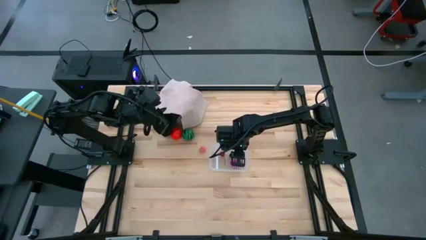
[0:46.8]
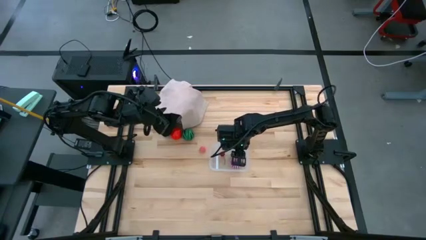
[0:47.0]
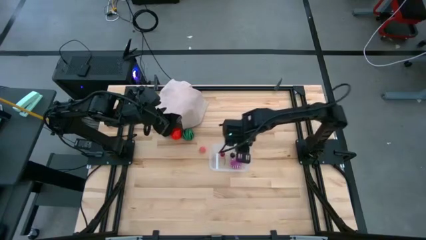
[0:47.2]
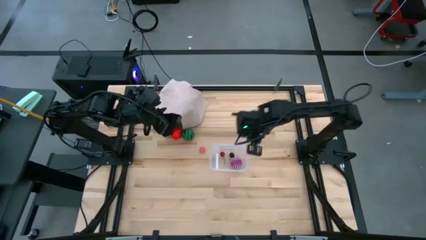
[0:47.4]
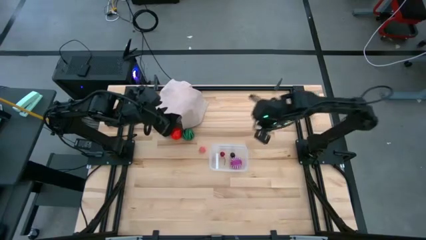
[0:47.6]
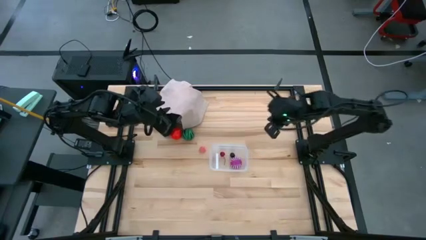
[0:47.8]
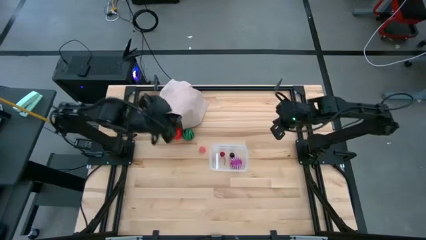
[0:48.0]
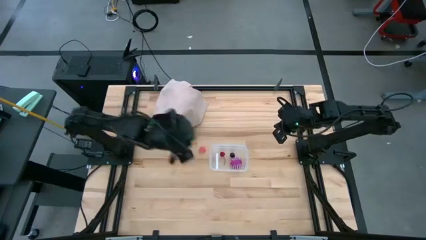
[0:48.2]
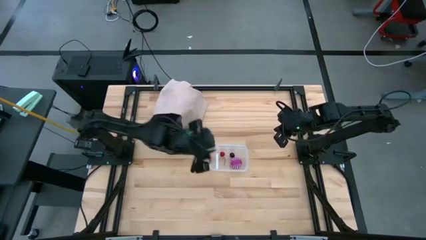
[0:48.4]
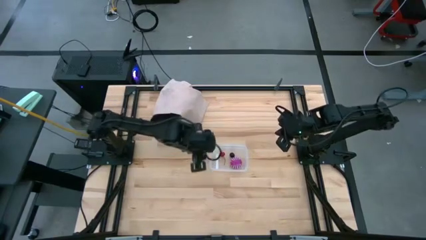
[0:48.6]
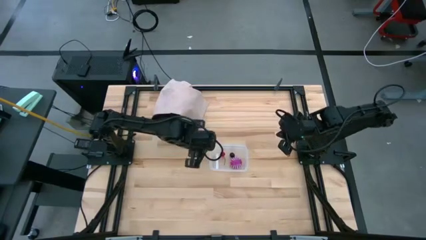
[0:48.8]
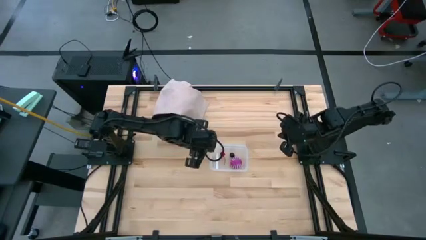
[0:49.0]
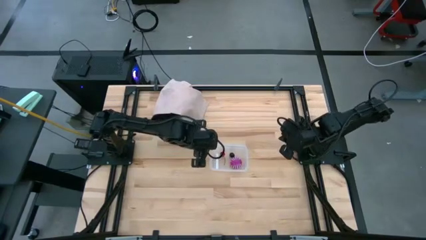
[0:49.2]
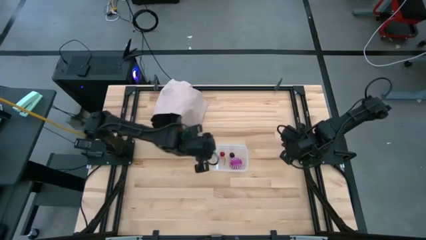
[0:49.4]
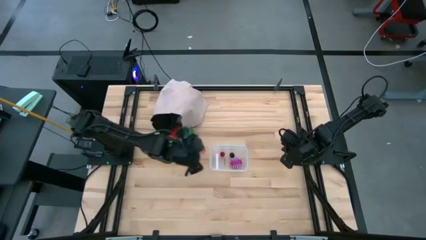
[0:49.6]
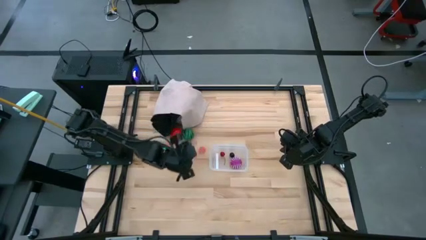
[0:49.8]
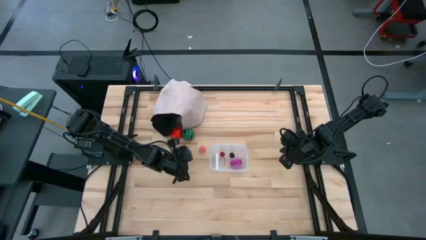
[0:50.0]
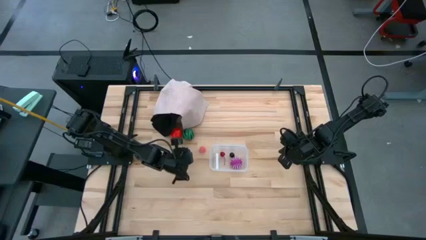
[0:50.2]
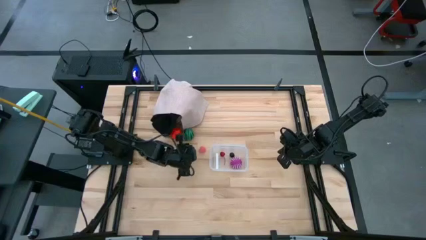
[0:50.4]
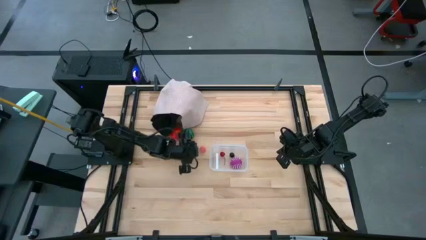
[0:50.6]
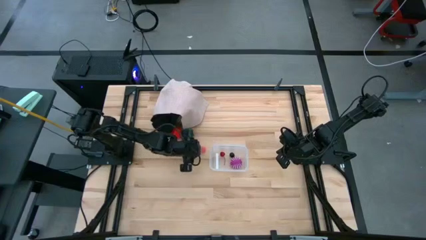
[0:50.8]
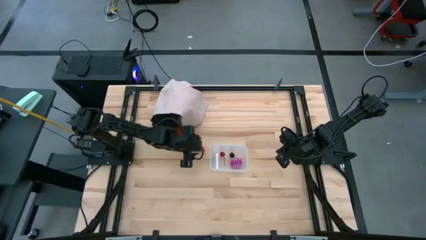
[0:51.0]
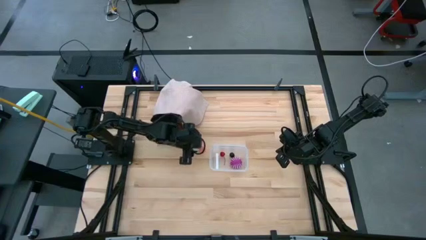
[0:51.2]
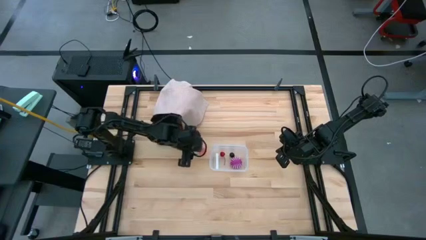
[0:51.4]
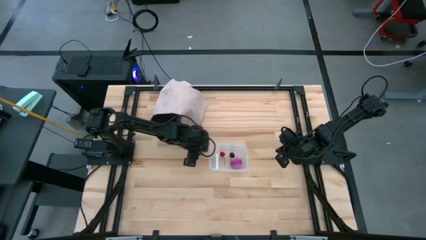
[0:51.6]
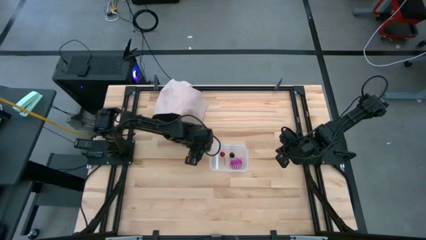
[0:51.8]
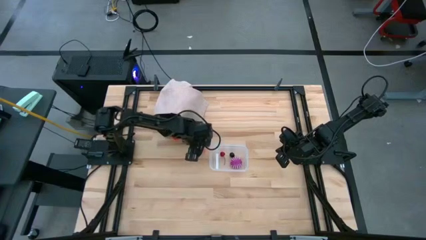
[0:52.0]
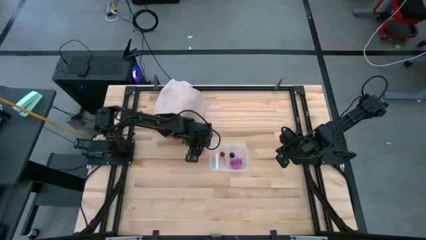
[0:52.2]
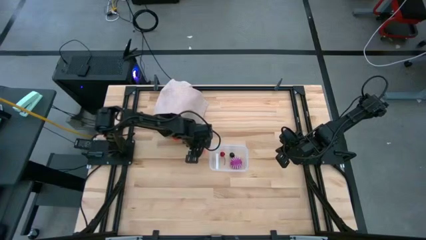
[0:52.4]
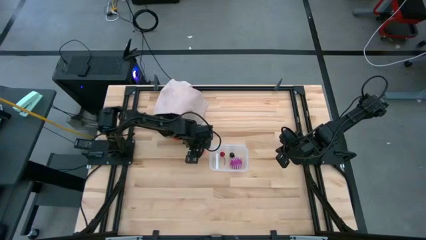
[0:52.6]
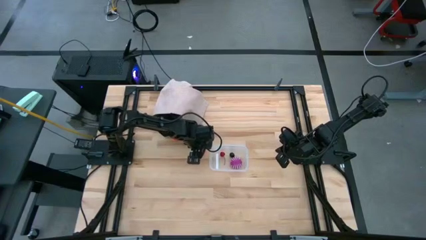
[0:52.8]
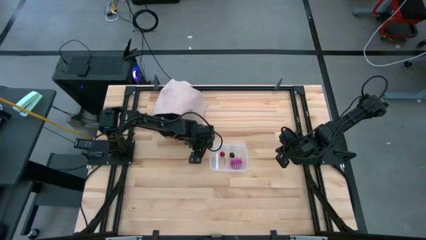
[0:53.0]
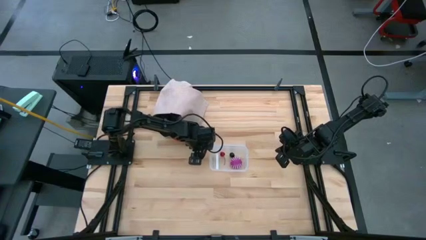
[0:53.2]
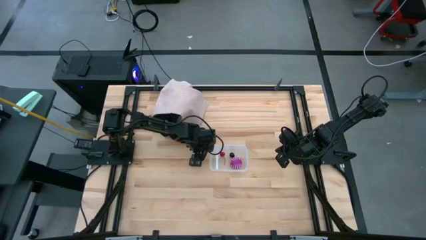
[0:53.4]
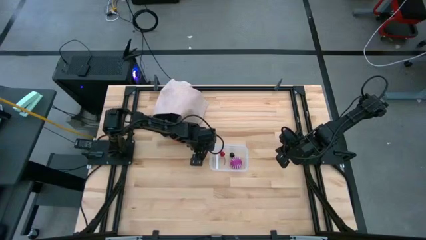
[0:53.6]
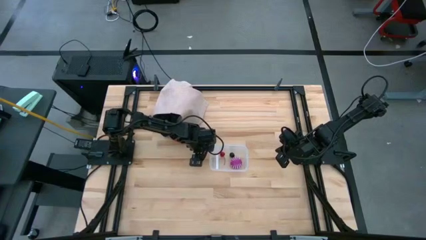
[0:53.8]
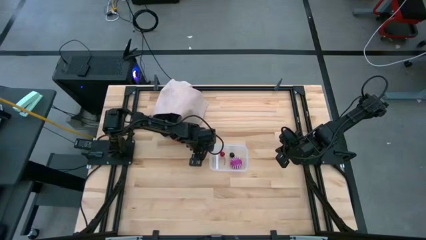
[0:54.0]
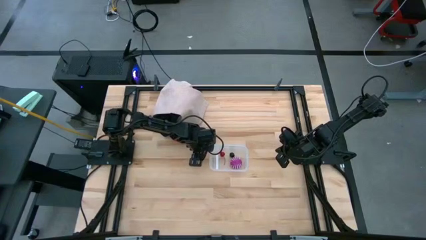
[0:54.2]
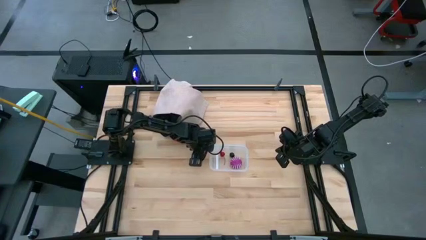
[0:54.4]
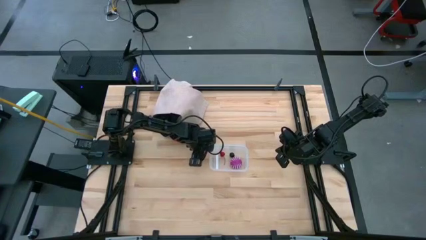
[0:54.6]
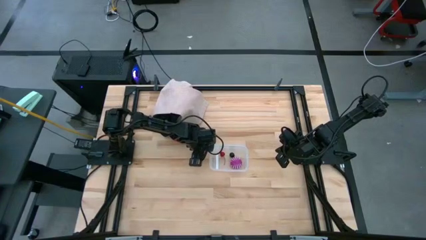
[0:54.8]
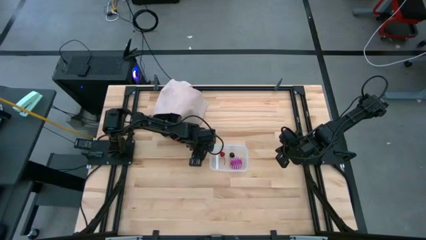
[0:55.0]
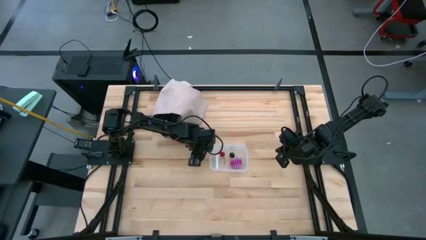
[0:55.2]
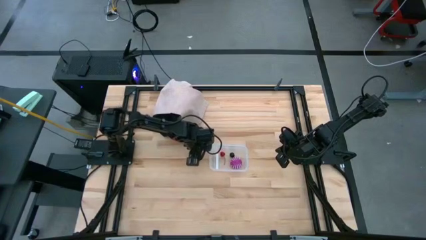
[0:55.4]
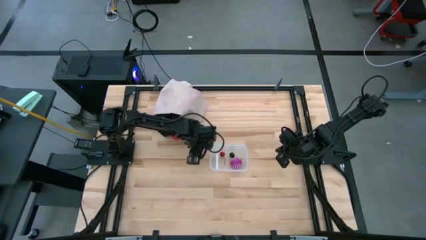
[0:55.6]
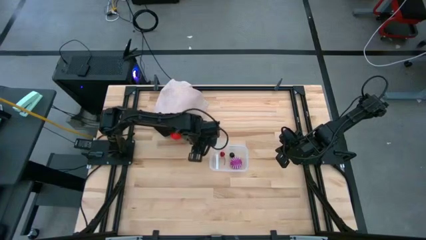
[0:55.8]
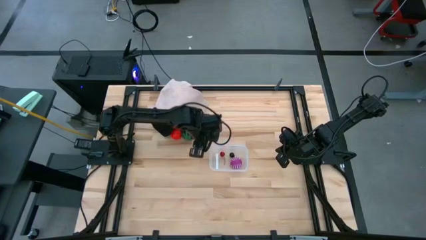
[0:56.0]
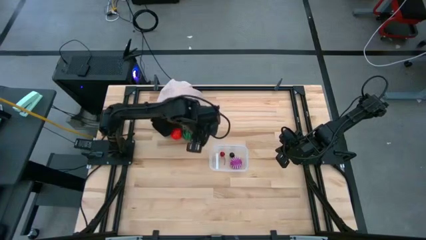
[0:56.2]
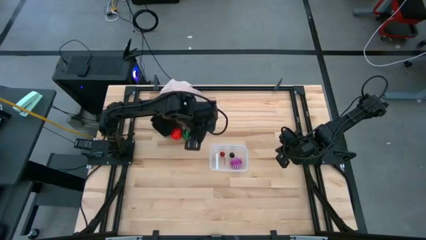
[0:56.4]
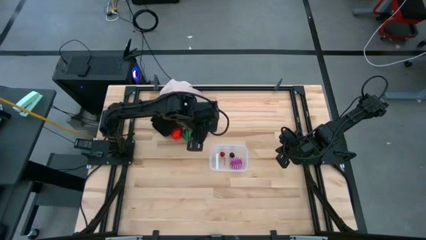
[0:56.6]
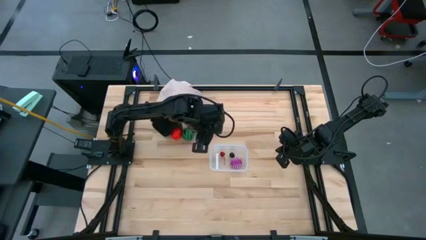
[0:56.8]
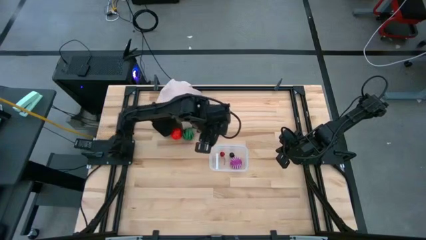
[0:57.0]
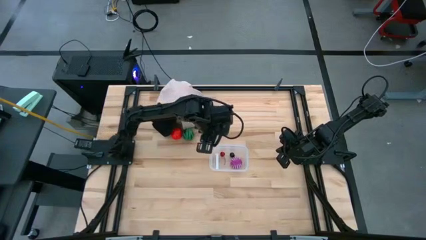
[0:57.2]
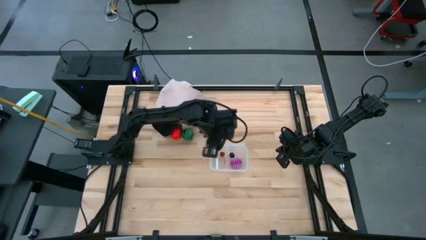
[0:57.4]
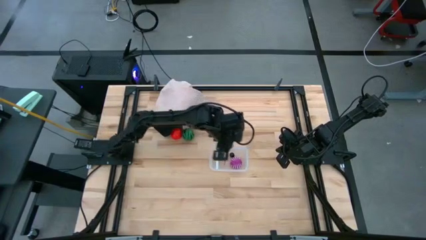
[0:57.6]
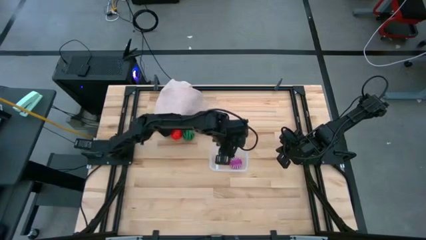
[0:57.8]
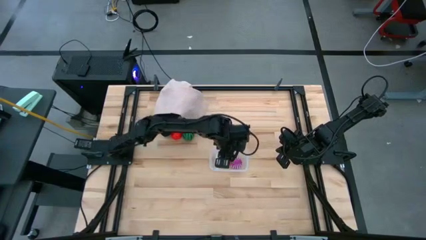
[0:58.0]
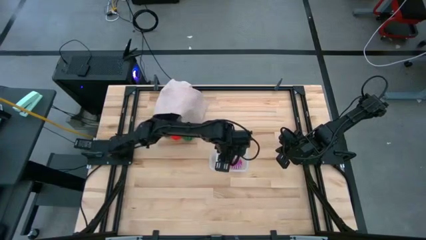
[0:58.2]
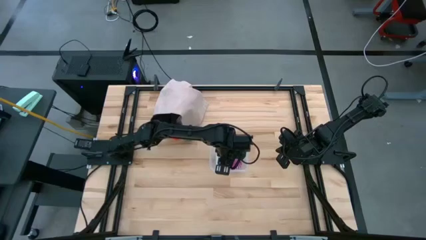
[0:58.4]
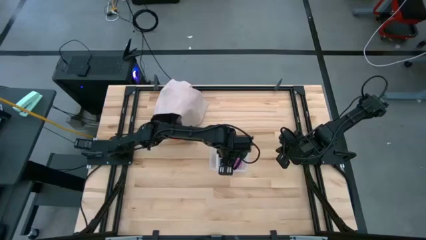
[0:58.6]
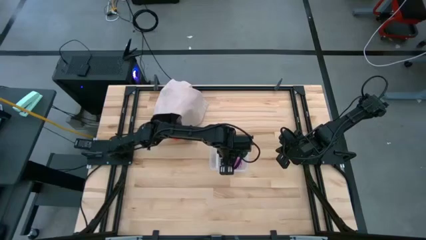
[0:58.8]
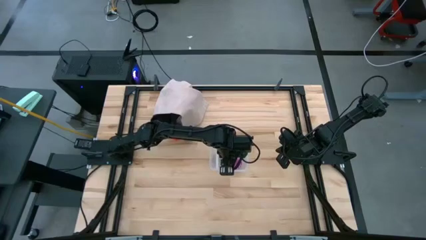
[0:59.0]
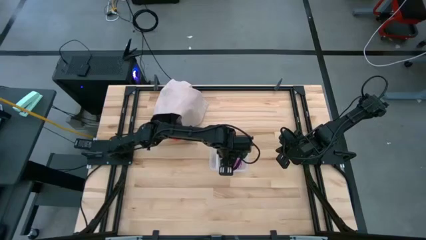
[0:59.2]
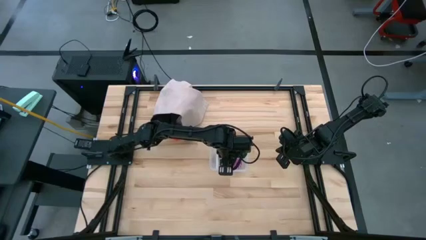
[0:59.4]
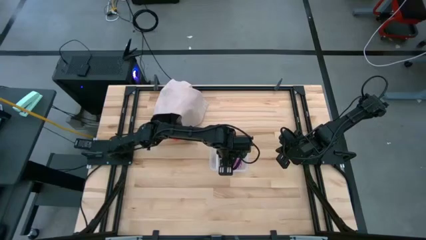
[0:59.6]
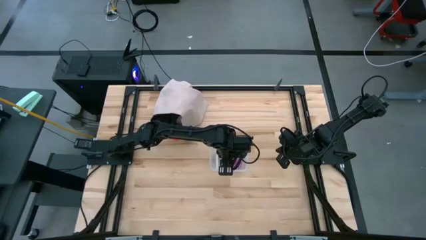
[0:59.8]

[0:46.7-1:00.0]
Task: Pick and placing Produce into tupperware
Put the peach into the transparent bin
